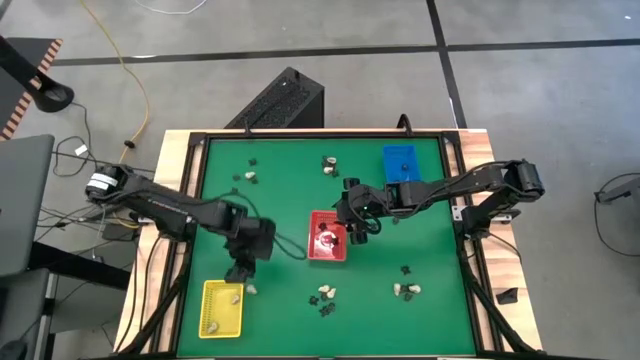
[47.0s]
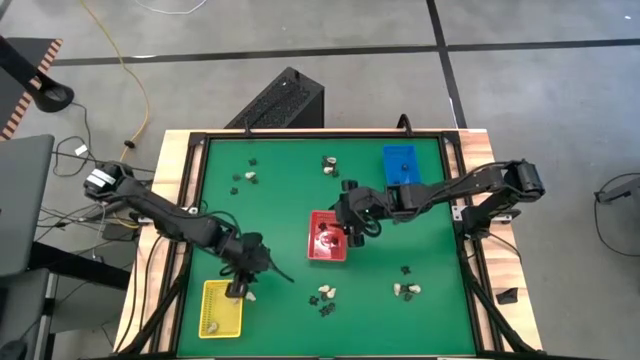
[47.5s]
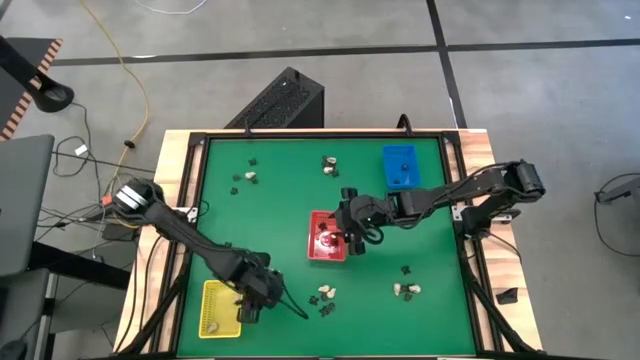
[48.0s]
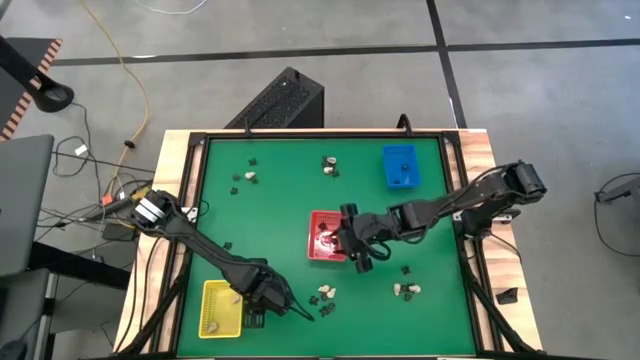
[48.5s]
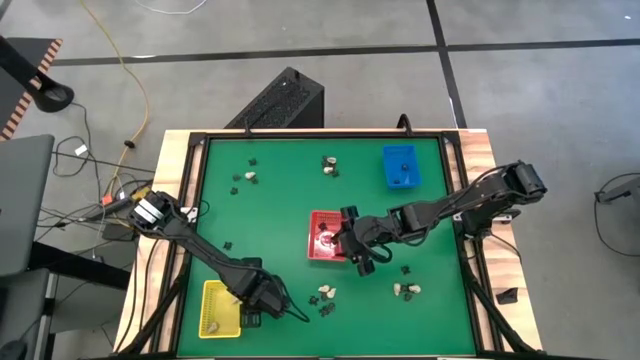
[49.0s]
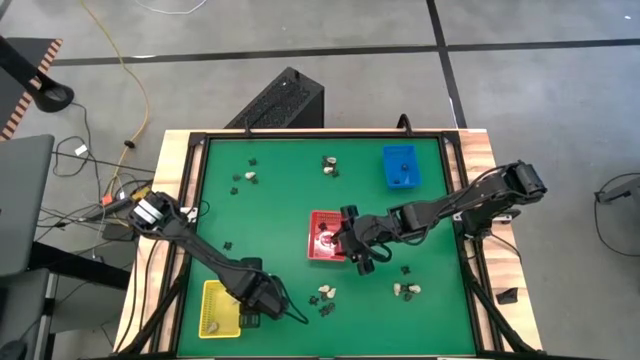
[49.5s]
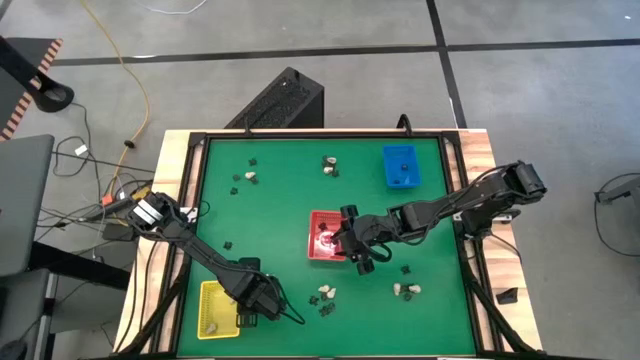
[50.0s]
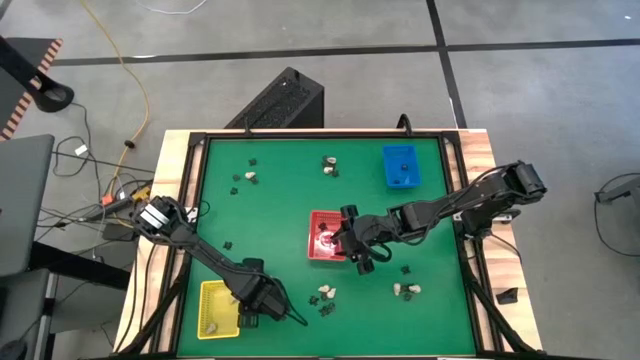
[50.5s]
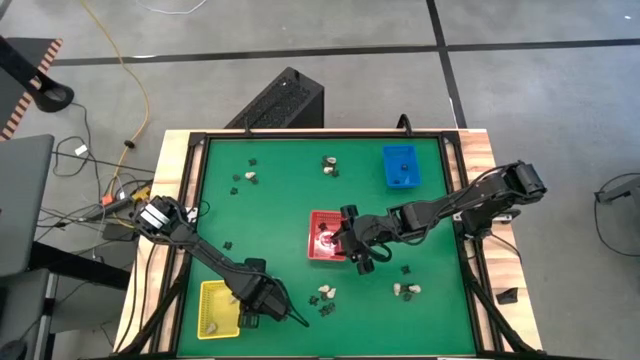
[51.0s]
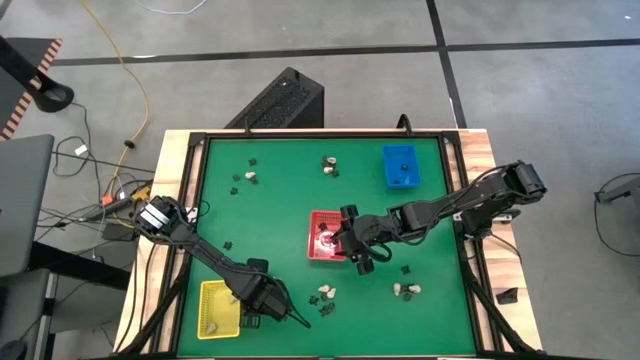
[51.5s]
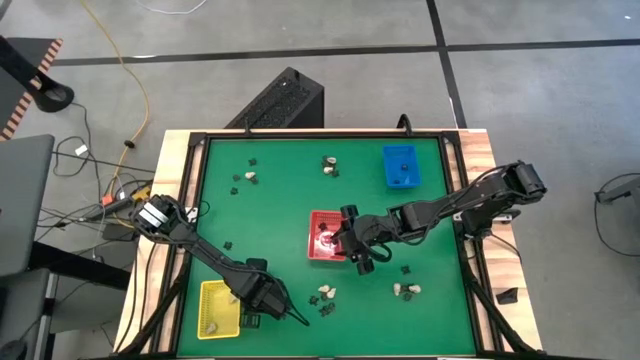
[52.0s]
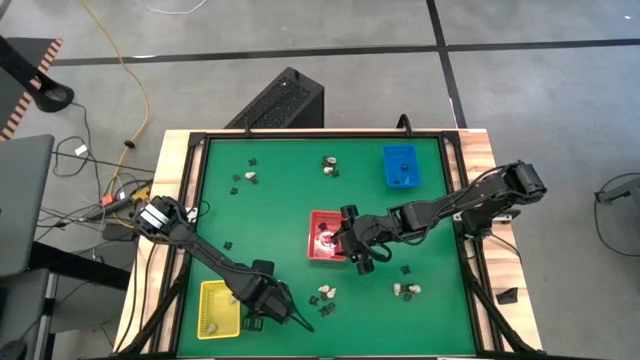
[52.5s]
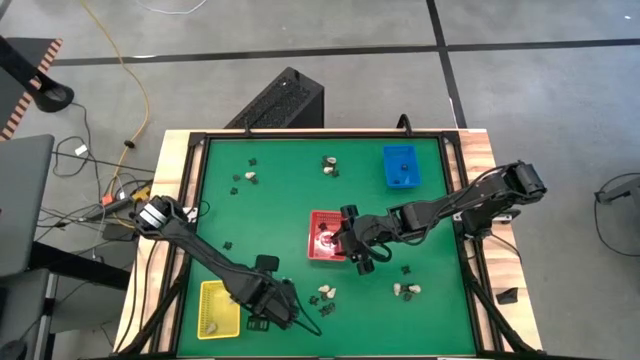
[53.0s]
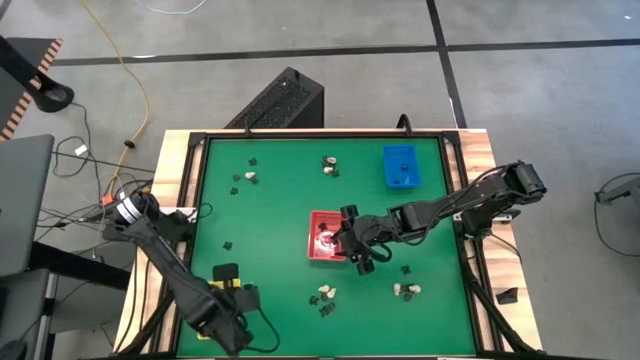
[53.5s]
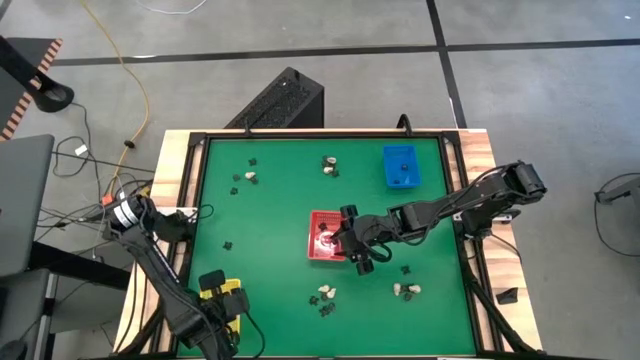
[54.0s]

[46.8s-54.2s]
Task: Sort Halloween decoration
Put the white skull toy into the yellow bin

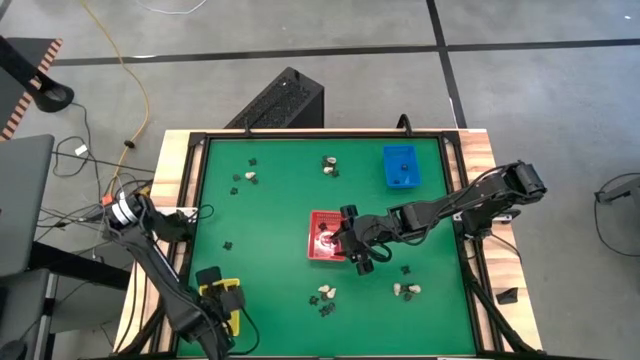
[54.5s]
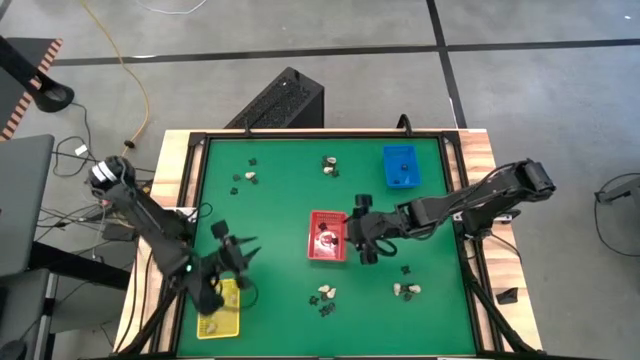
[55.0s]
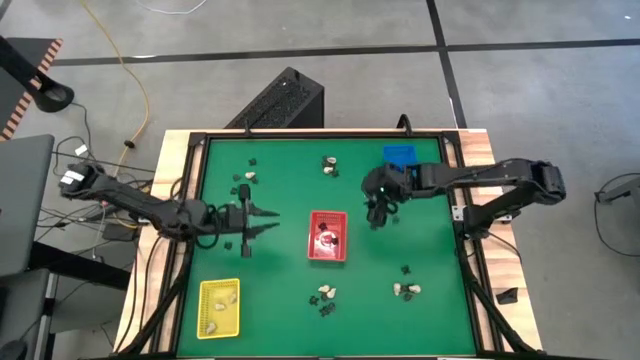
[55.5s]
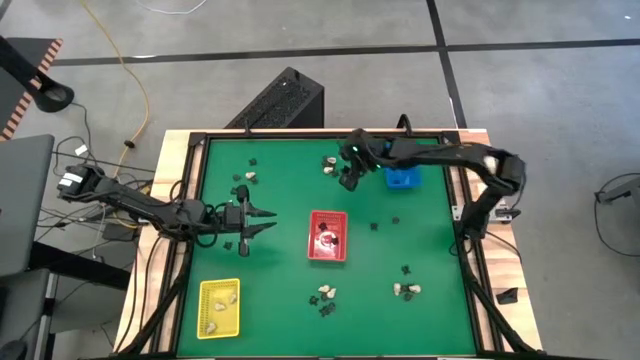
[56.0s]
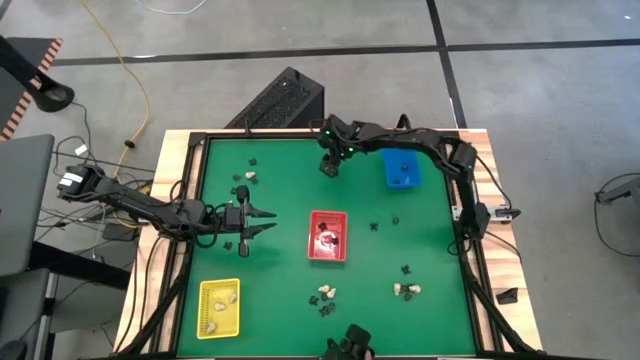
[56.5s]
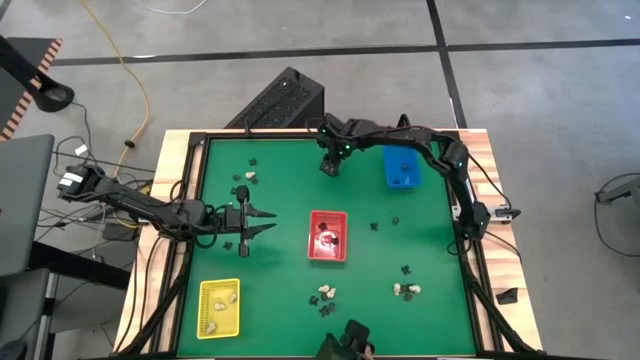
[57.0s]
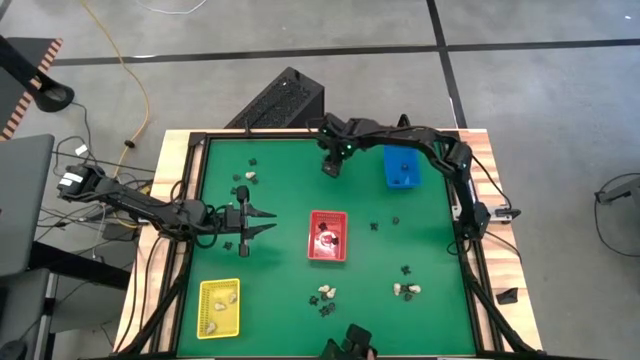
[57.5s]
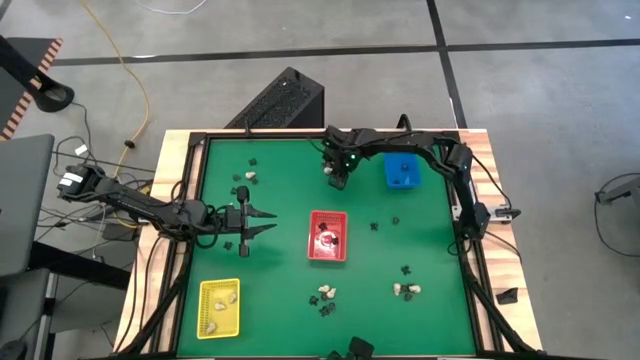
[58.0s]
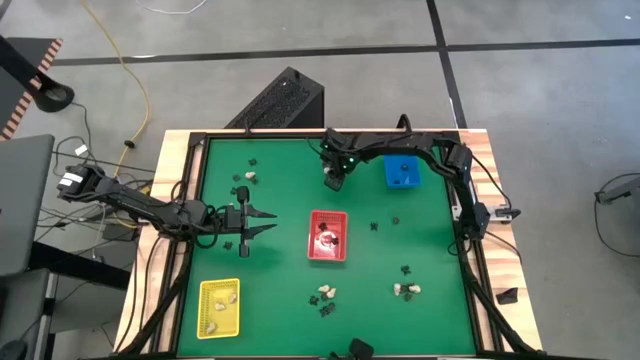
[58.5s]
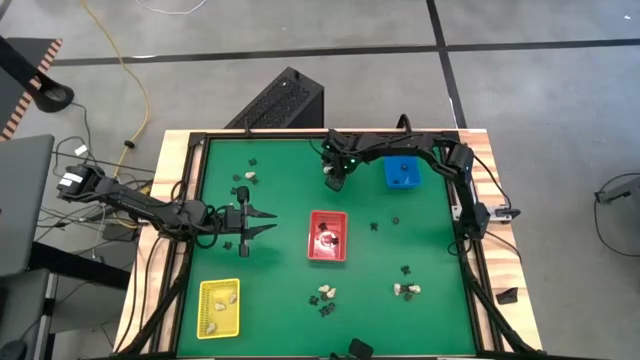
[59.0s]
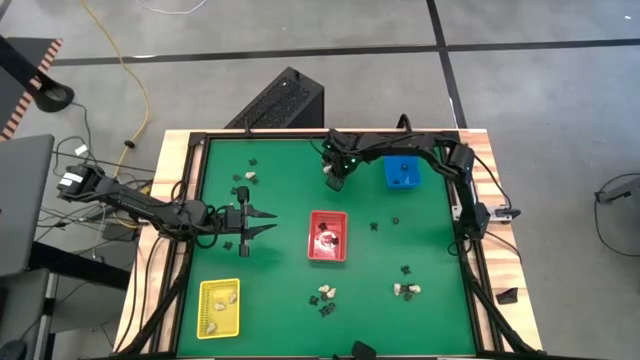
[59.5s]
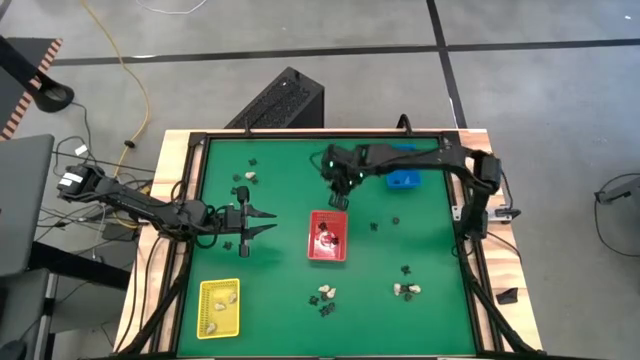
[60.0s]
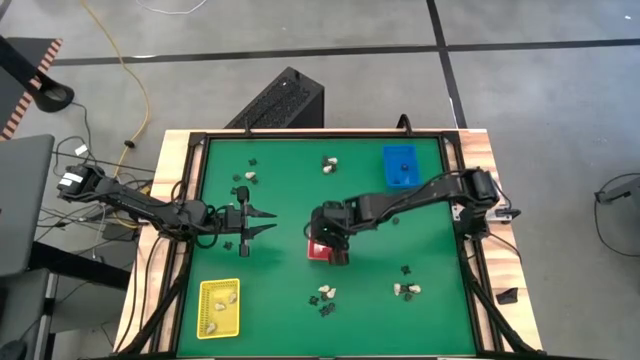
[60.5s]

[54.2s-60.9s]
Put the black spider toy into the red bin

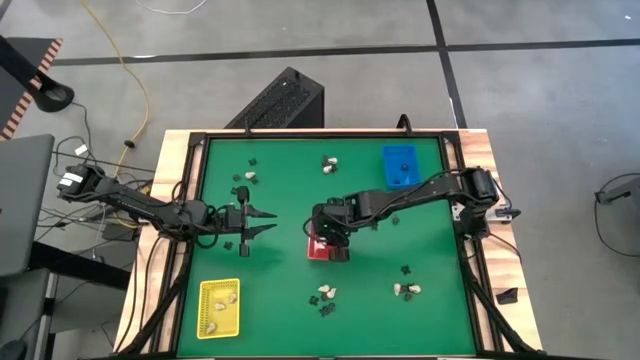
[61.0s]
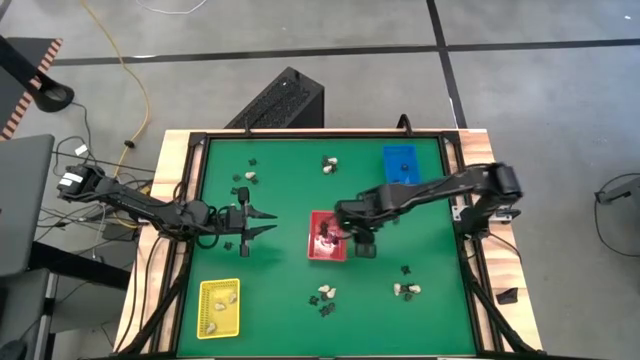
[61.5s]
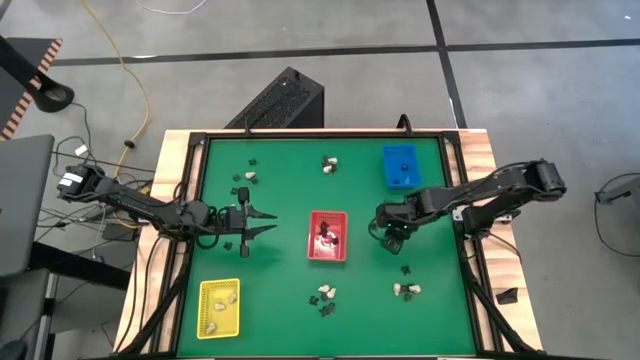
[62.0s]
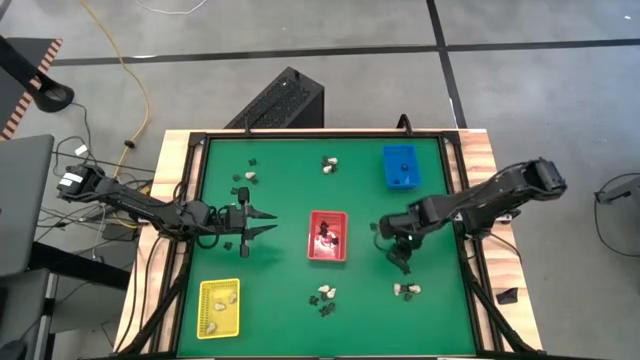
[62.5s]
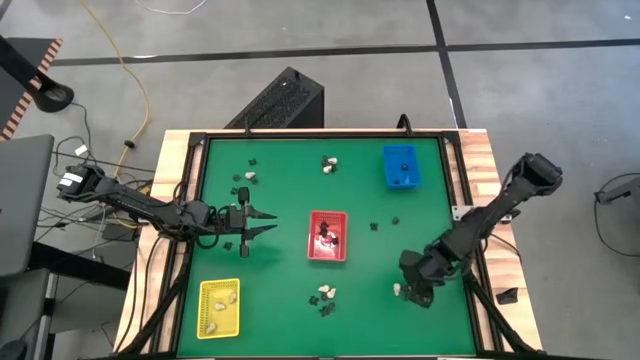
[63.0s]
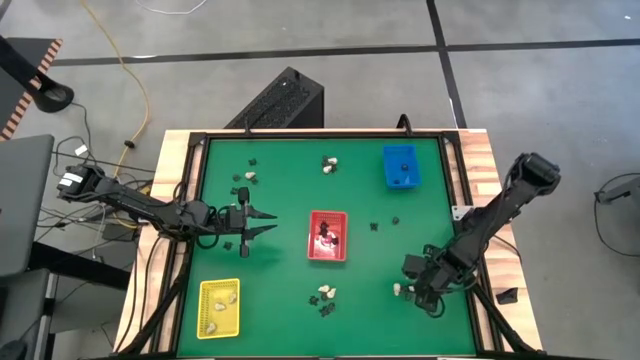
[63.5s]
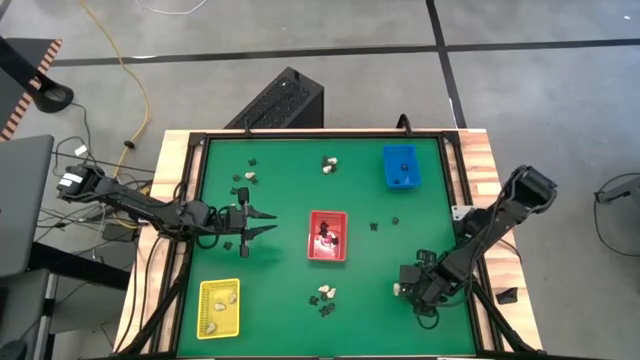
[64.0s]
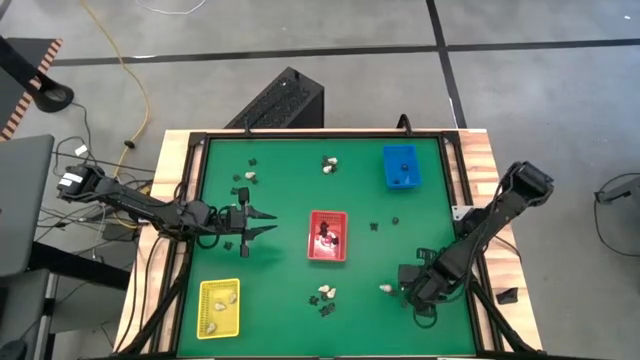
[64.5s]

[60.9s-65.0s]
Put the white skull toy into the yellow bin

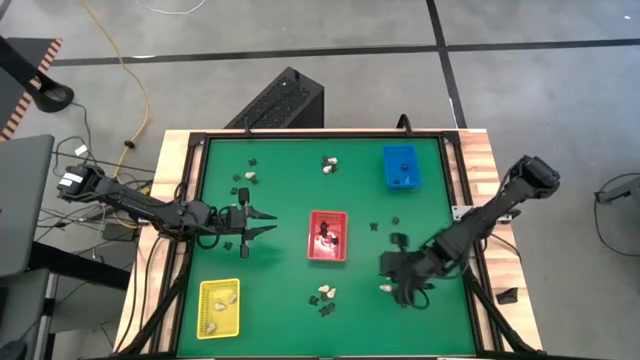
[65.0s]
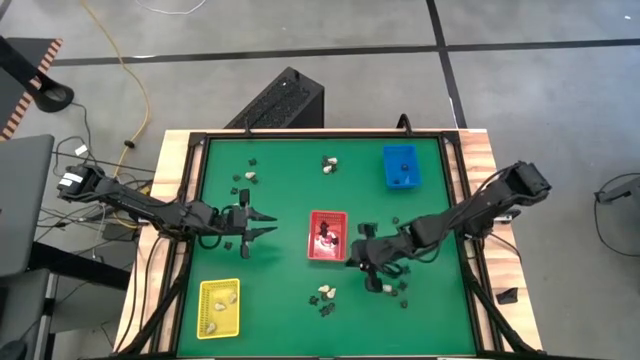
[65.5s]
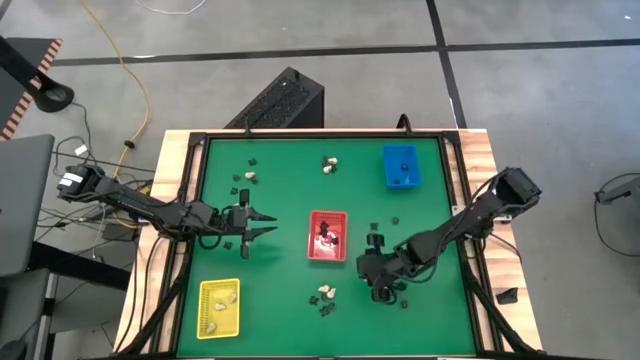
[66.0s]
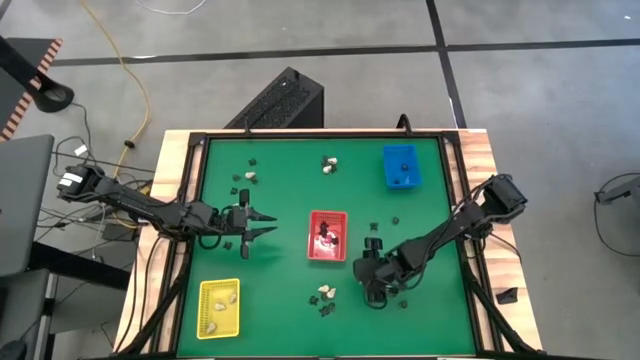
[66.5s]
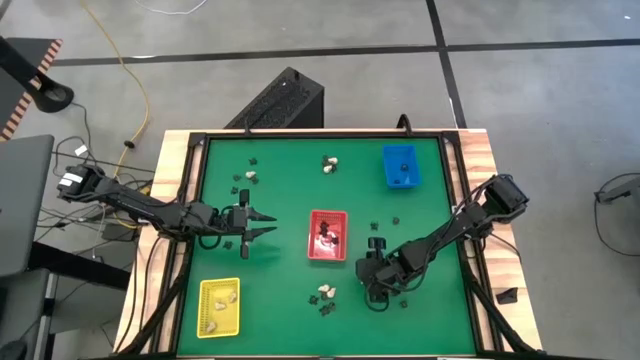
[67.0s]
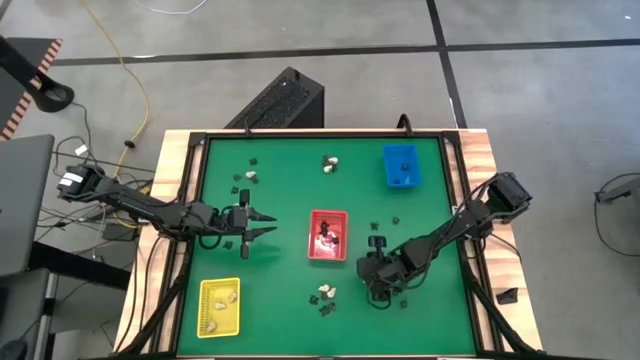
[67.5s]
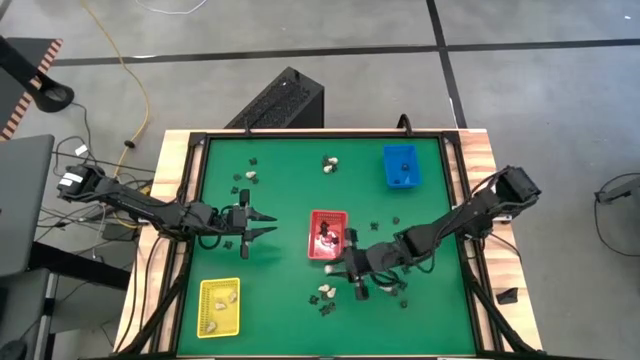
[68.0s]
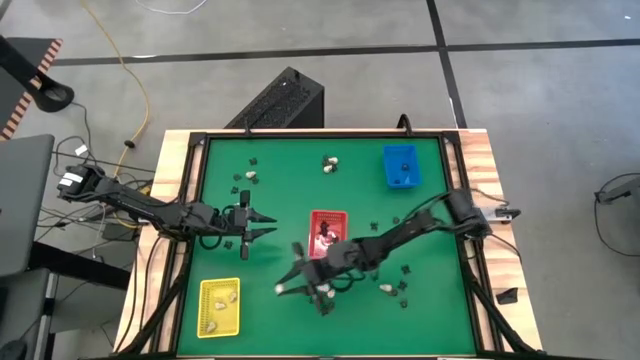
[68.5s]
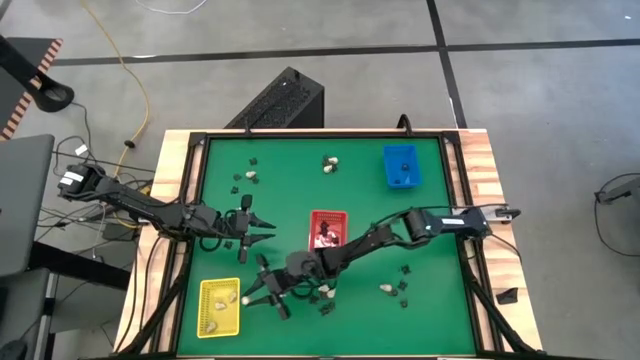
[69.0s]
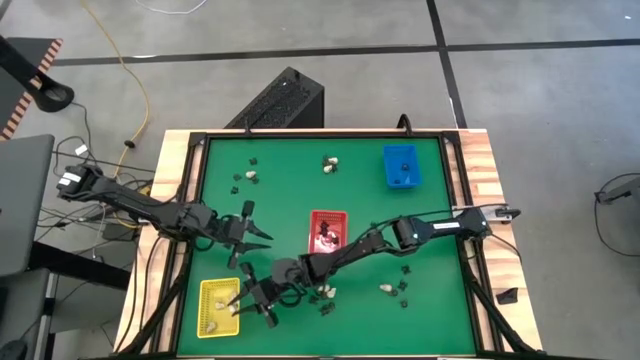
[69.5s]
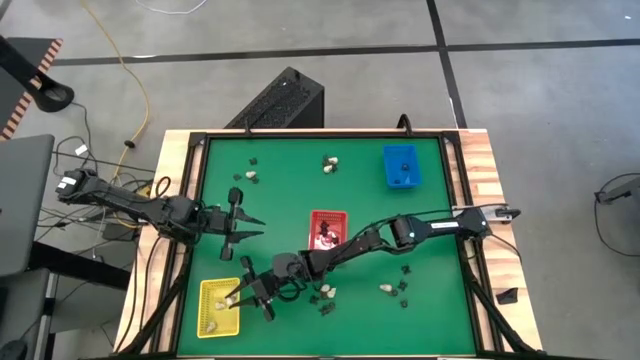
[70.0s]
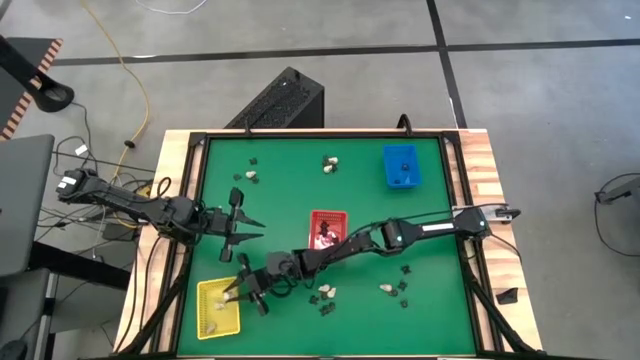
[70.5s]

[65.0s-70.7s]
Put the white skull toy into the yellow bin
